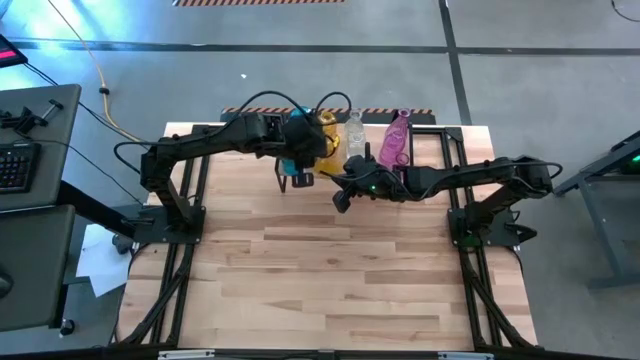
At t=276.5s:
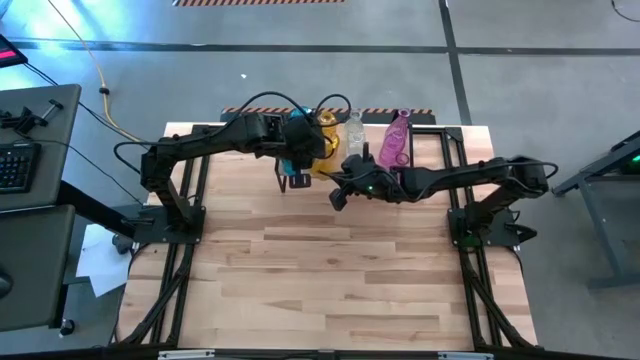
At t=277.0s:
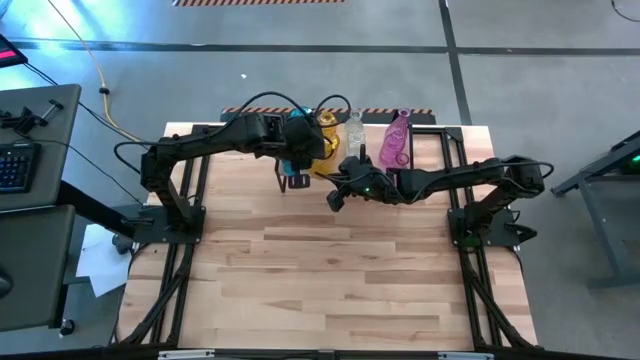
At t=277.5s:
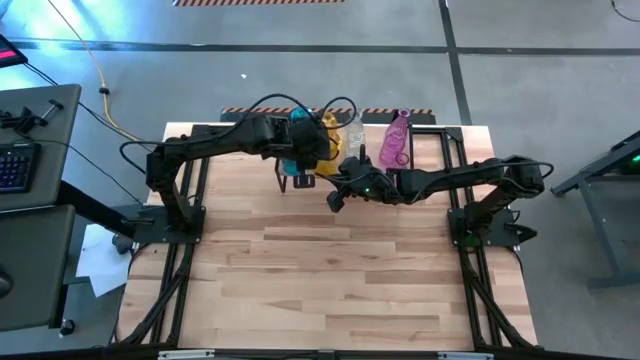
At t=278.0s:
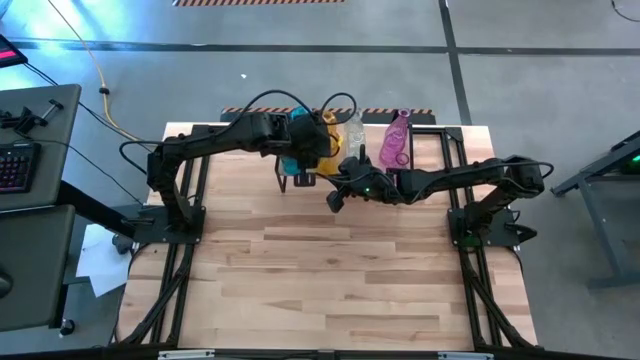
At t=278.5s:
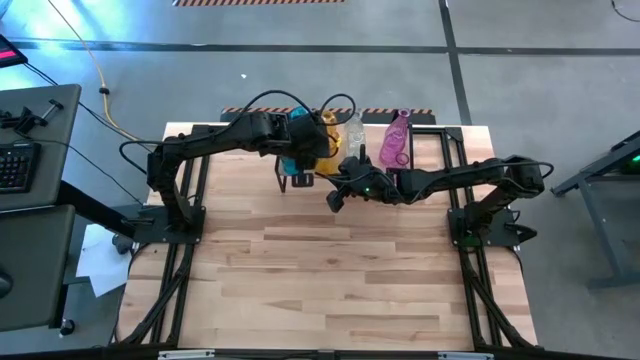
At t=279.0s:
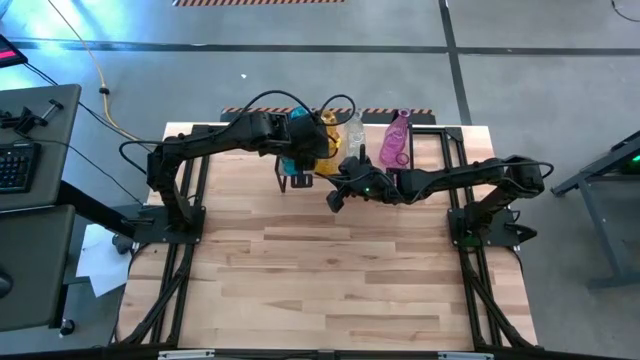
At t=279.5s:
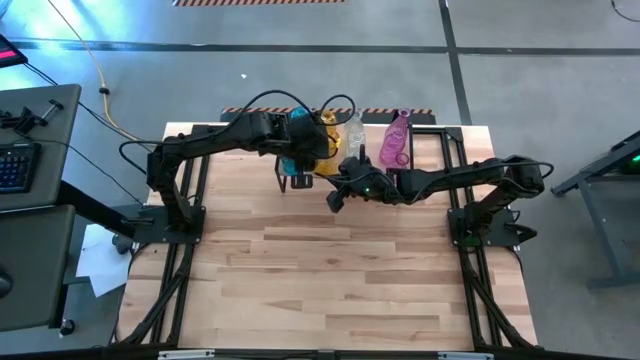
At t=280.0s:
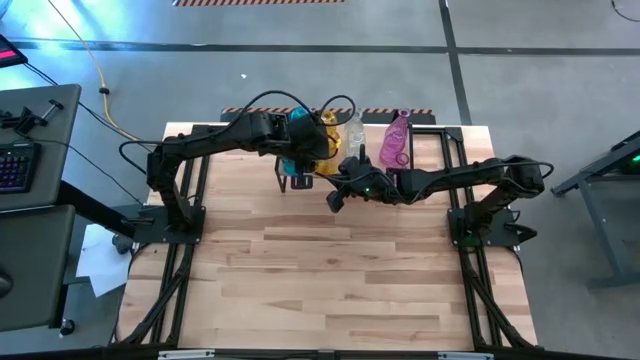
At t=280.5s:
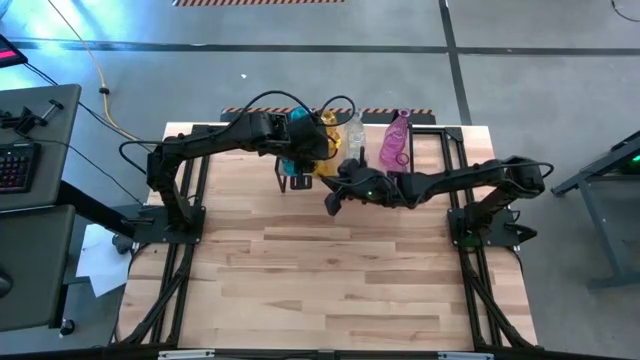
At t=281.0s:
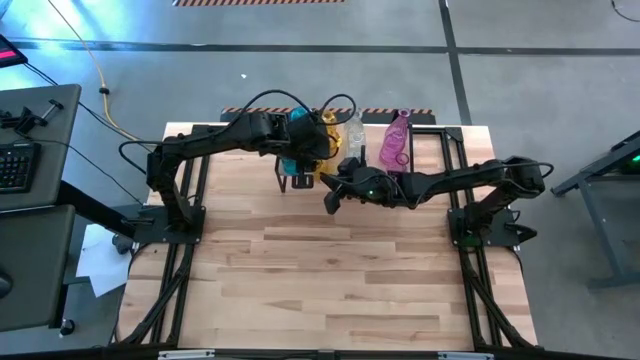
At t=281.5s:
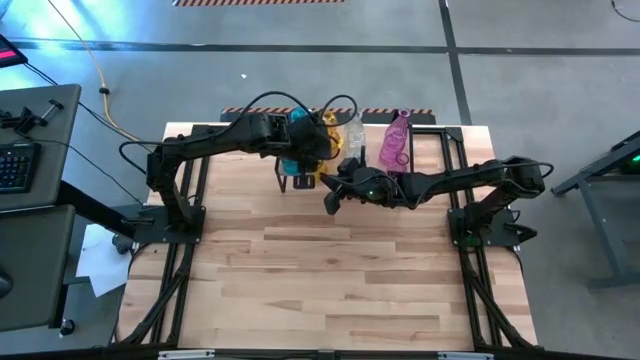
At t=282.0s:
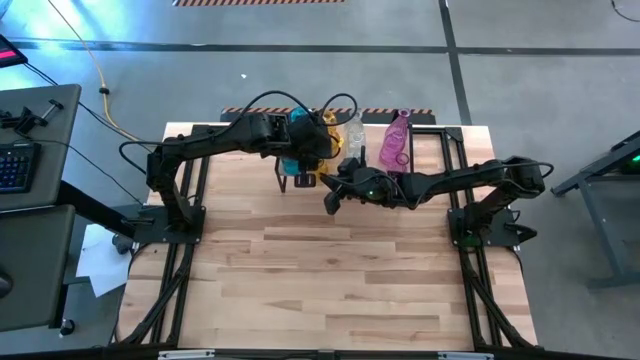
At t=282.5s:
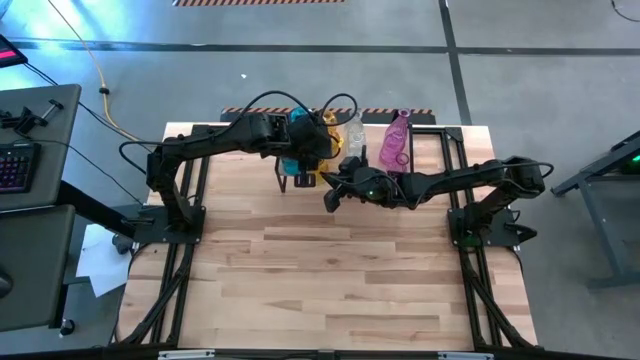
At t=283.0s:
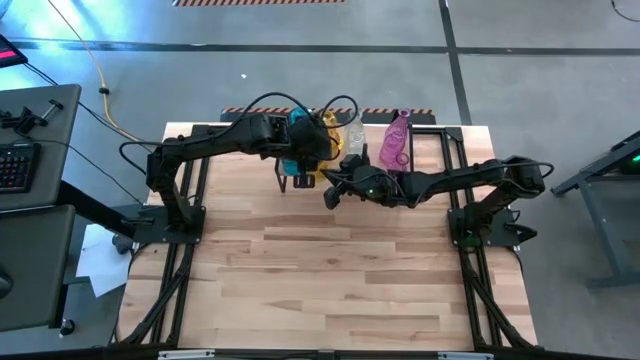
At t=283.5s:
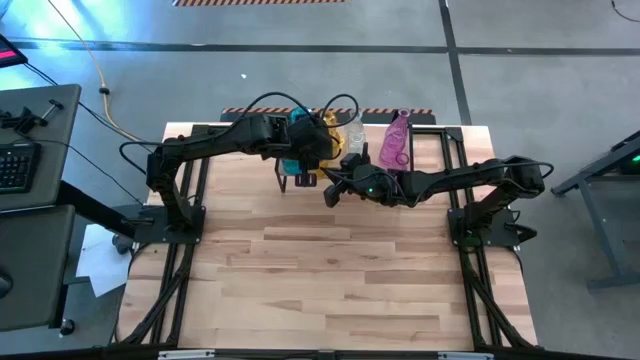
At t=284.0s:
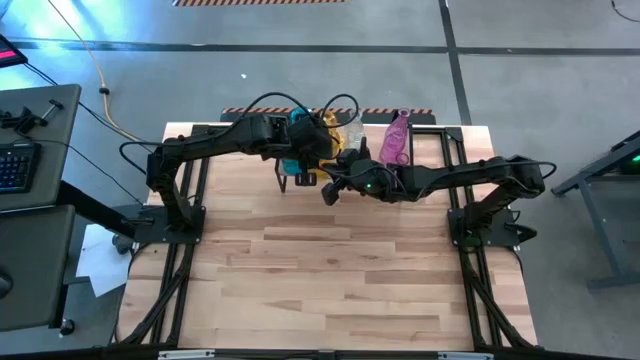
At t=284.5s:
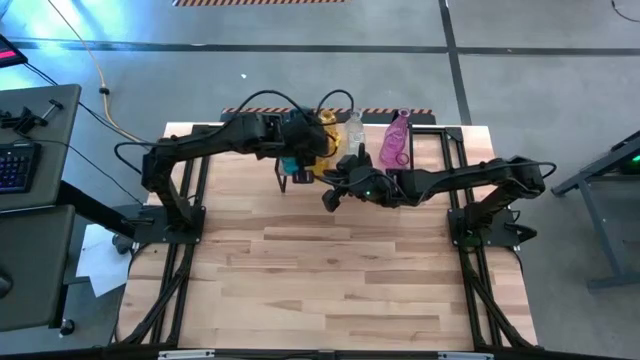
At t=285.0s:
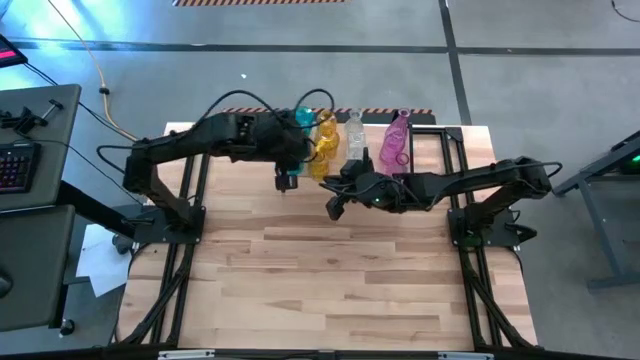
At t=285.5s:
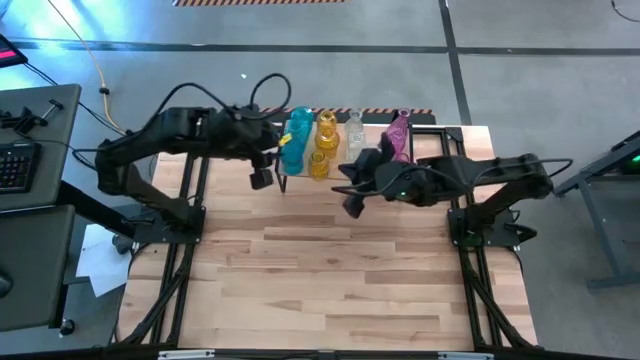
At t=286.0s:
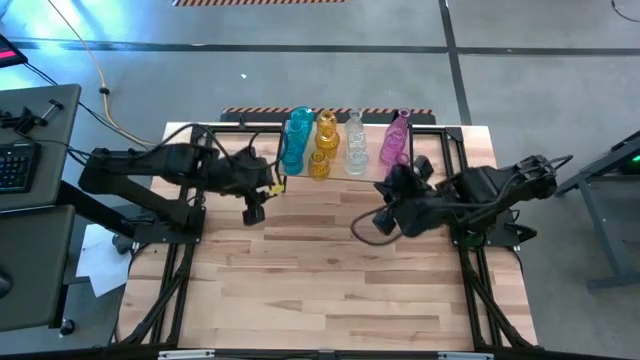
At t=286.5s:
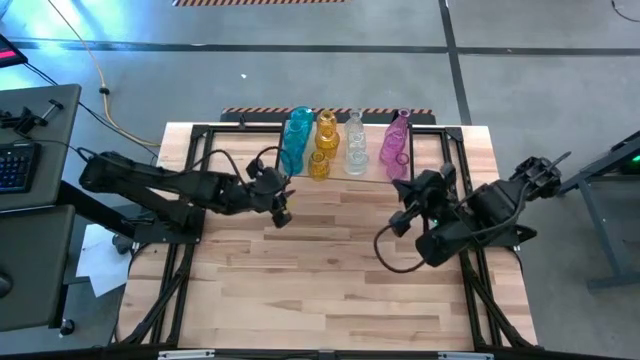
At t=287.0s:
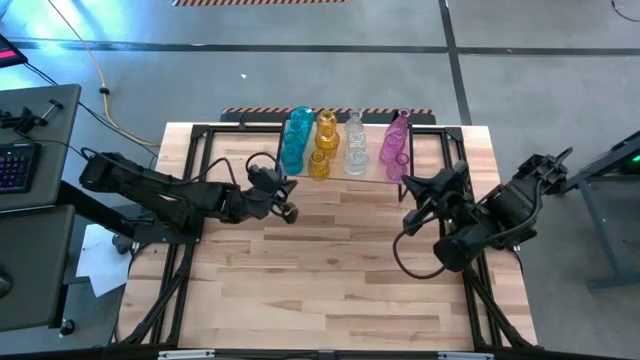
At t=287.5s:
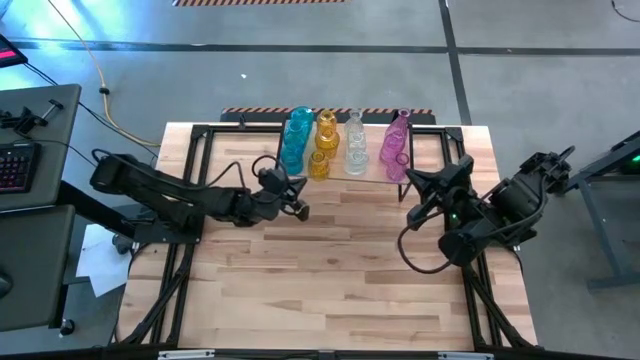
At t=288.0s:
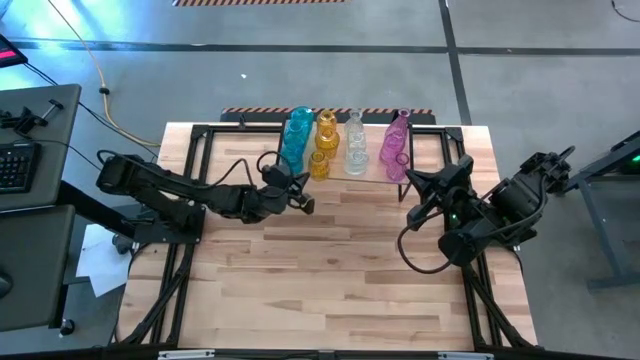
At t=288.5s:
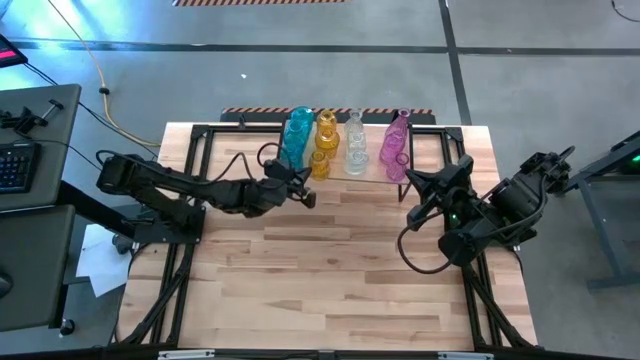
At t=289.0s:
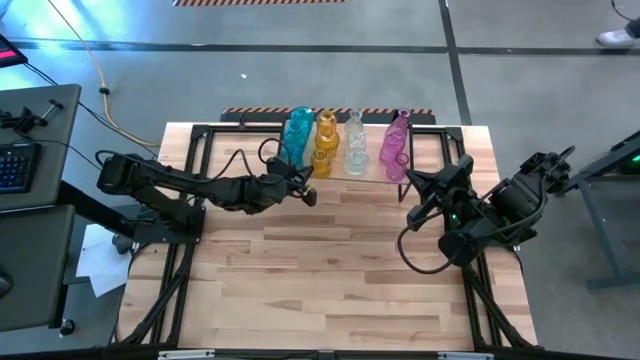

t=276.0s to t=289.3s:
Task: sort vases onto shelf
Put the yellow transparent vase on the shelf aligned with the other yellow vases

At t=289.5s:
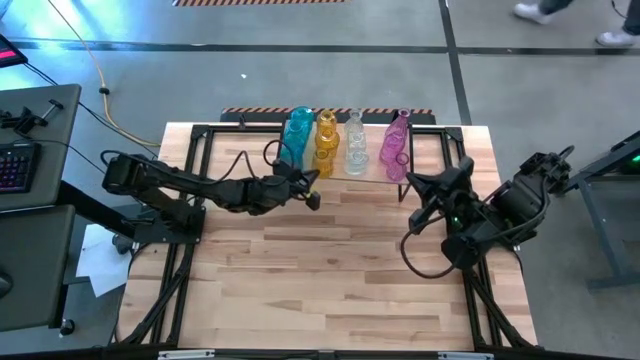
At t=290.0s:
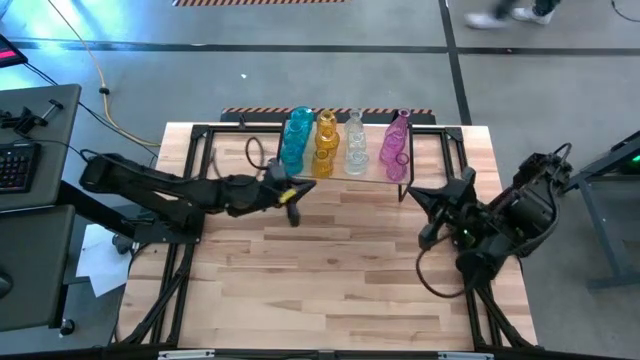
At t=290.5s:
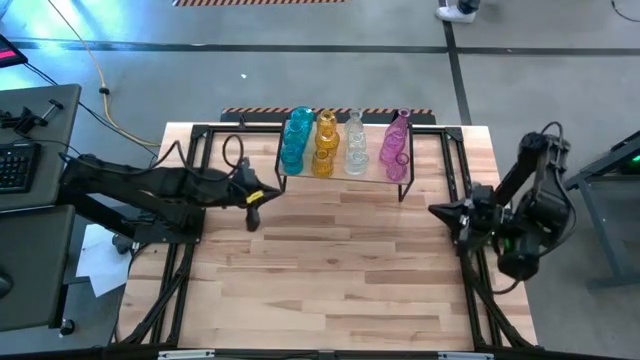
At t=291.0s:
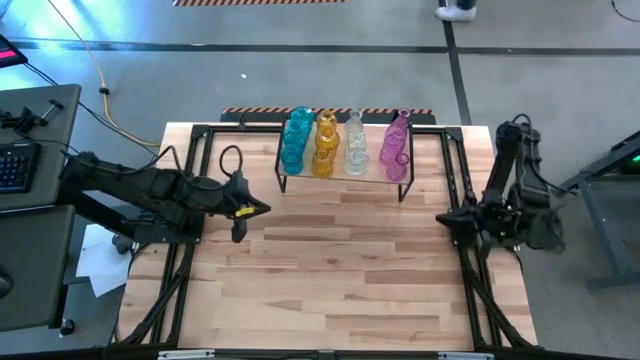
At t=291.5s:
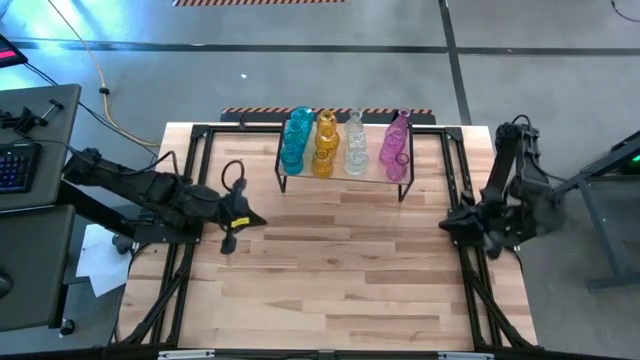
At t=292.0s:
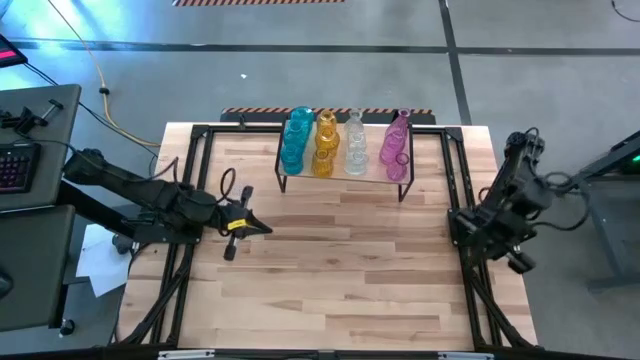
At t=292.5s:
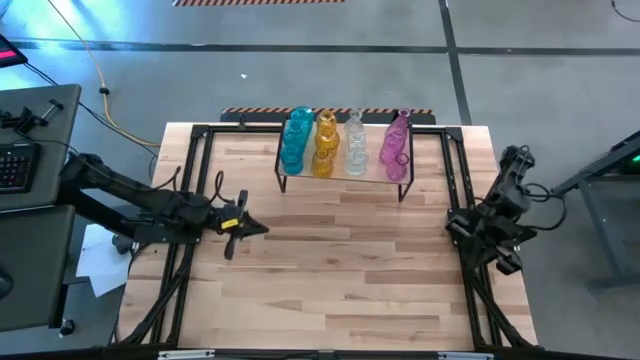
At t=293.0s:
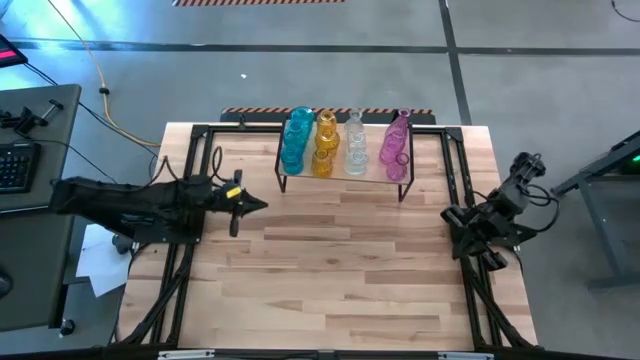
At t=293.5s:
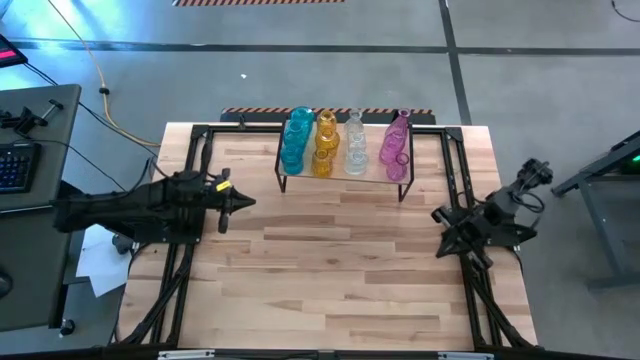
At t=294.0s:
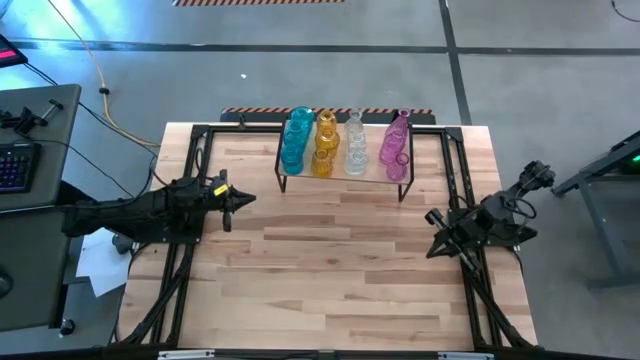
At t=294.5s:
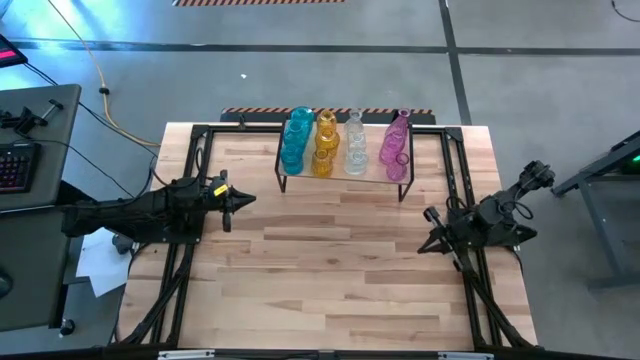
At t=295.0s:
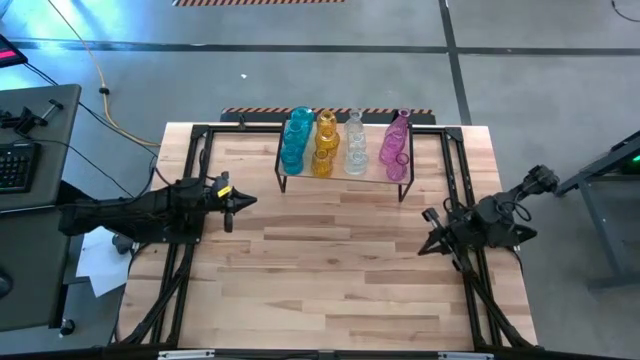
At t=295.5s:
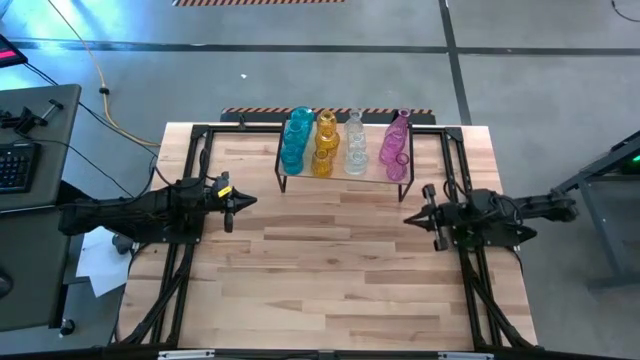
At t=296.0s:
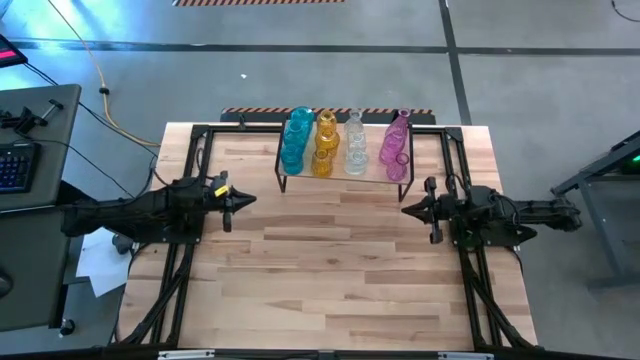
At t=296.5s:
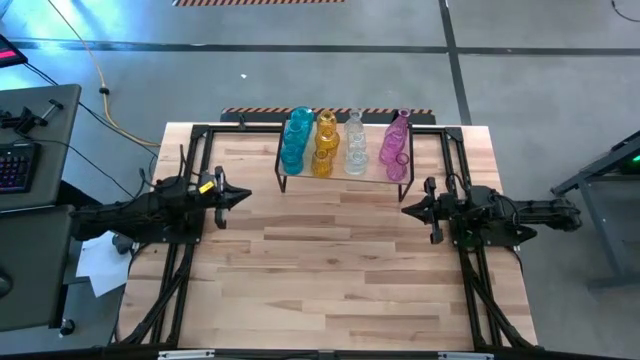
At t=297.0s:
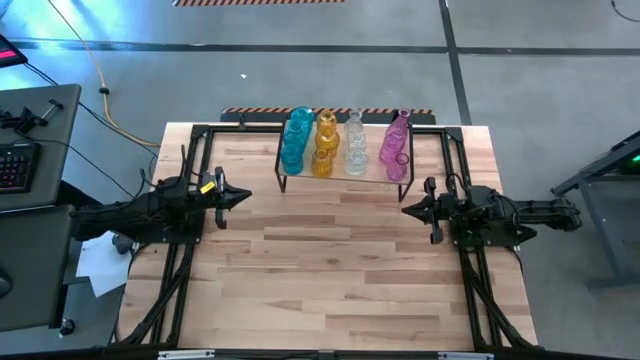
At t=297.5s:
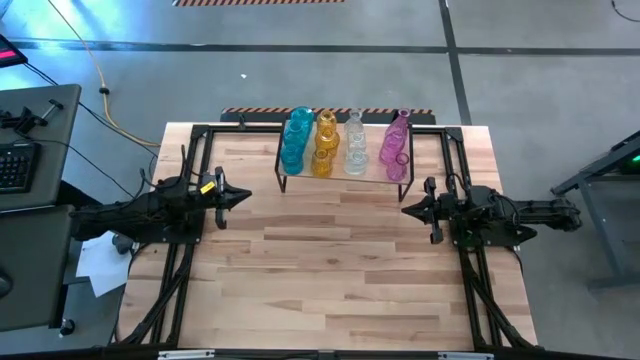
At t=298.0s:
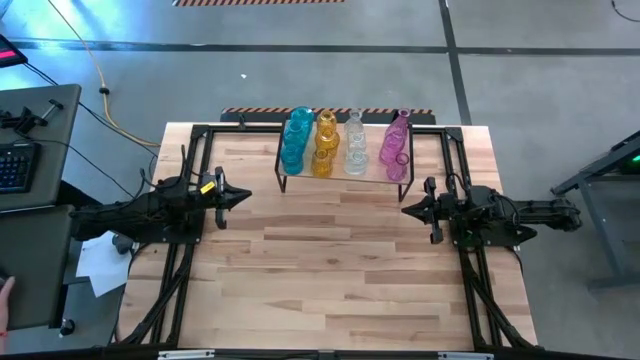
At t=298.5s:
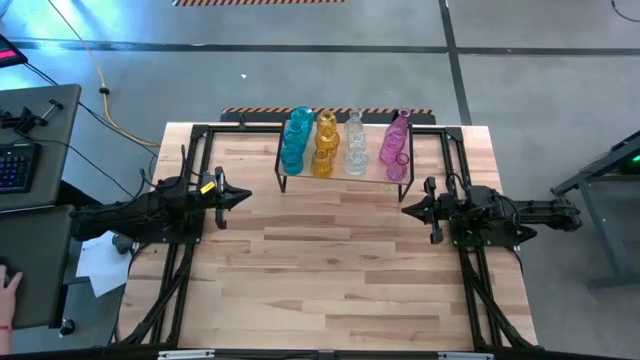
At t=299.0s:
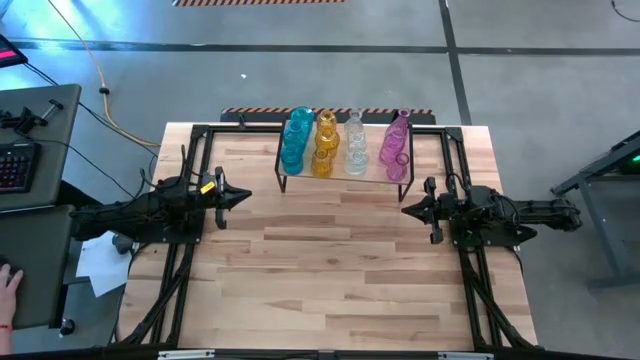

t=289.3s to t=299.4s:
Return to Home Position
